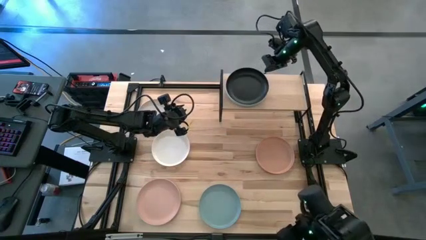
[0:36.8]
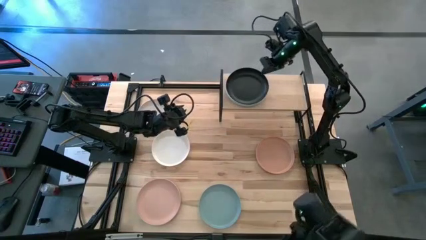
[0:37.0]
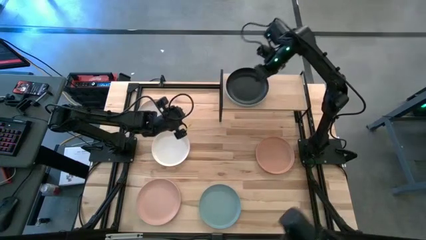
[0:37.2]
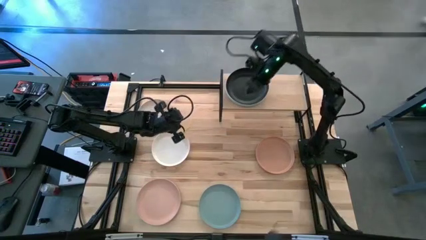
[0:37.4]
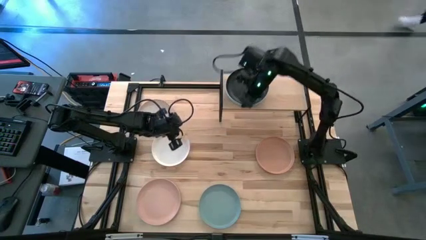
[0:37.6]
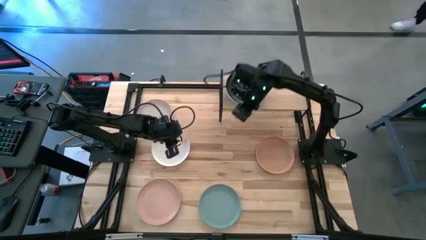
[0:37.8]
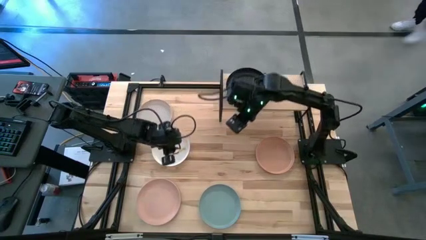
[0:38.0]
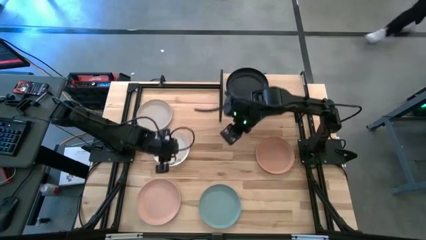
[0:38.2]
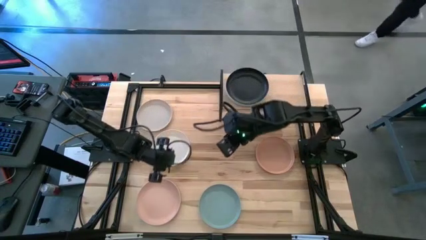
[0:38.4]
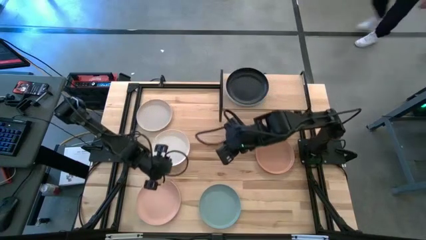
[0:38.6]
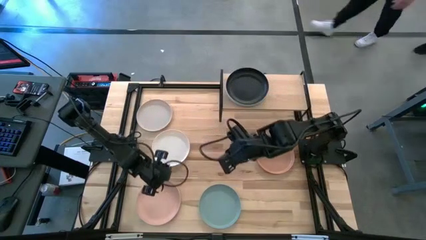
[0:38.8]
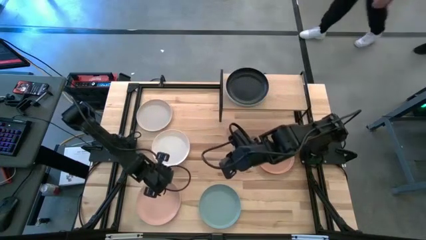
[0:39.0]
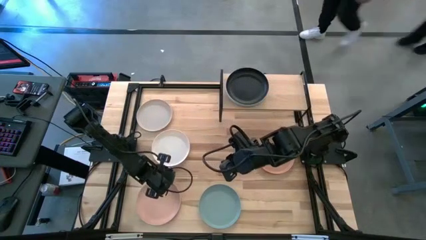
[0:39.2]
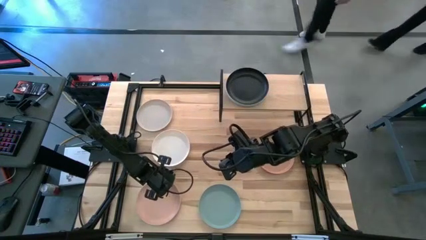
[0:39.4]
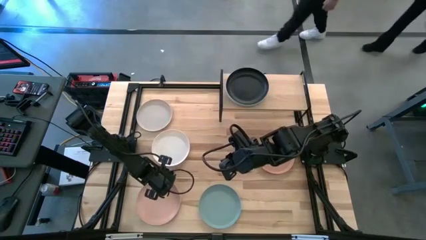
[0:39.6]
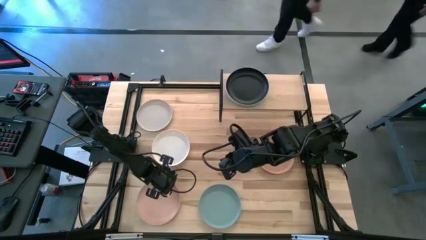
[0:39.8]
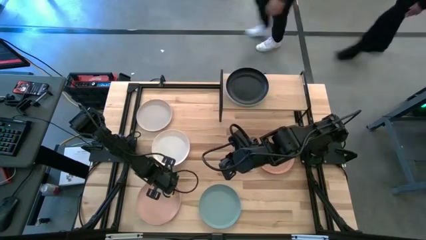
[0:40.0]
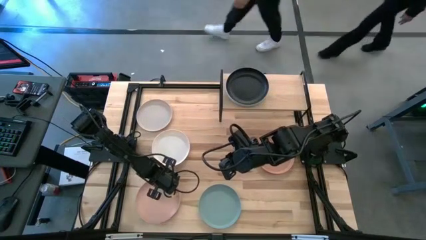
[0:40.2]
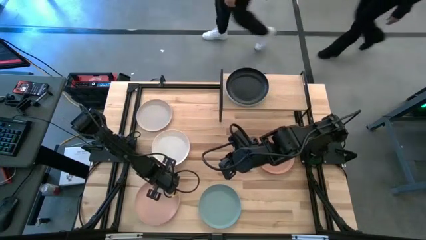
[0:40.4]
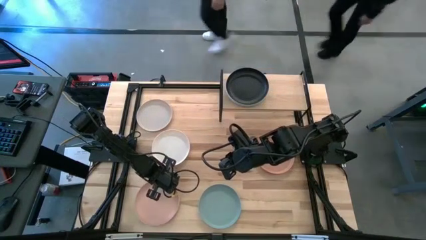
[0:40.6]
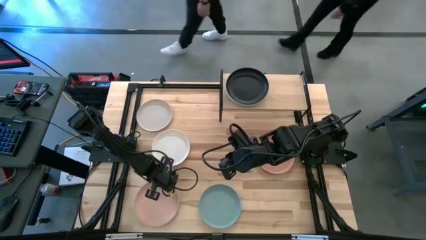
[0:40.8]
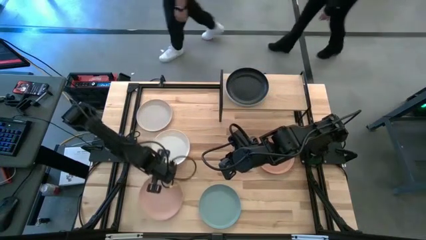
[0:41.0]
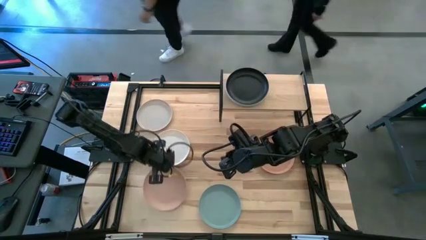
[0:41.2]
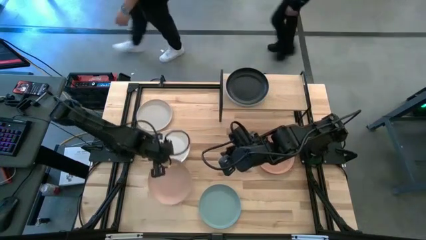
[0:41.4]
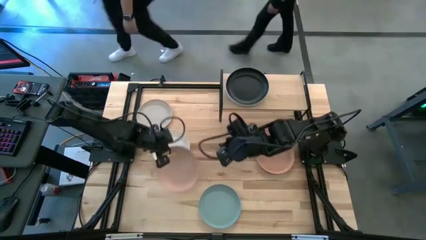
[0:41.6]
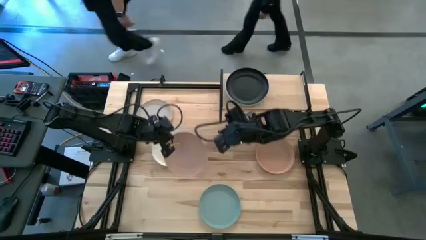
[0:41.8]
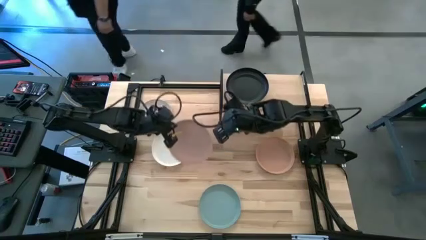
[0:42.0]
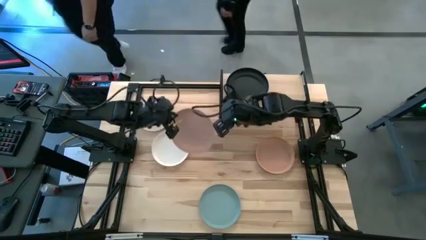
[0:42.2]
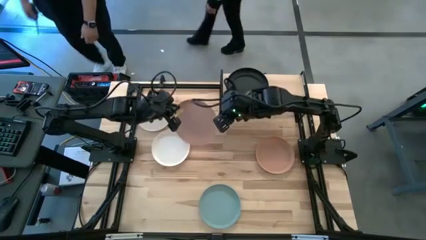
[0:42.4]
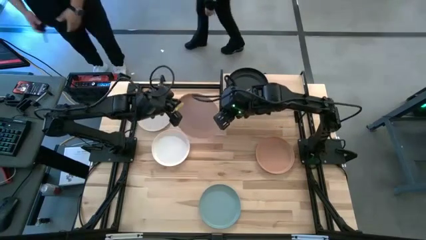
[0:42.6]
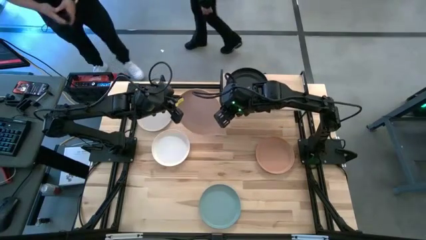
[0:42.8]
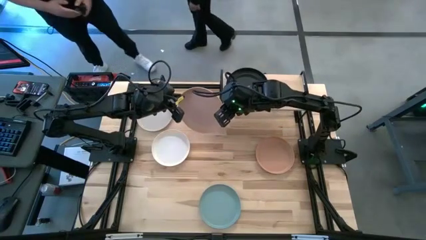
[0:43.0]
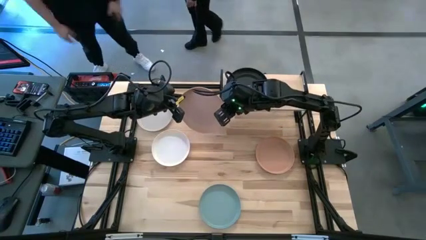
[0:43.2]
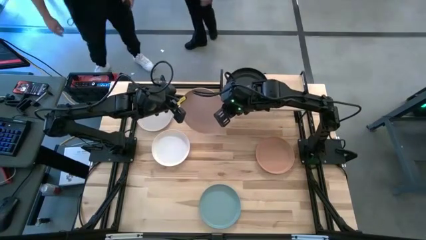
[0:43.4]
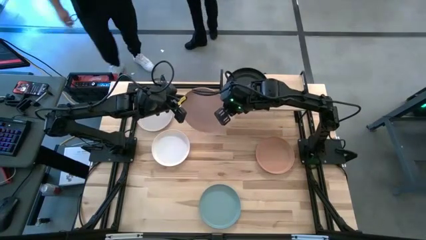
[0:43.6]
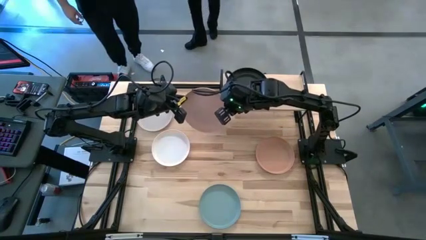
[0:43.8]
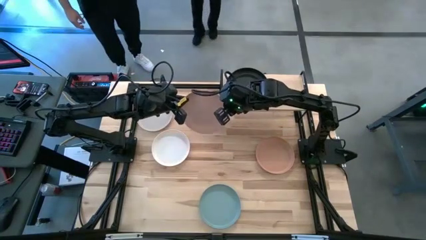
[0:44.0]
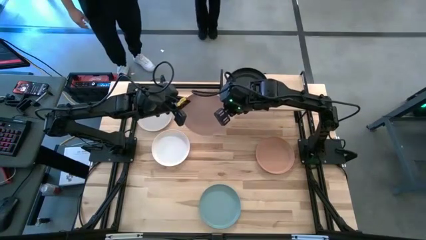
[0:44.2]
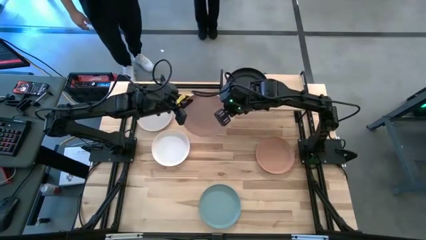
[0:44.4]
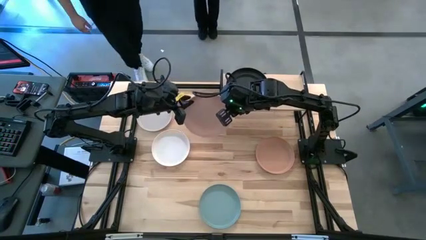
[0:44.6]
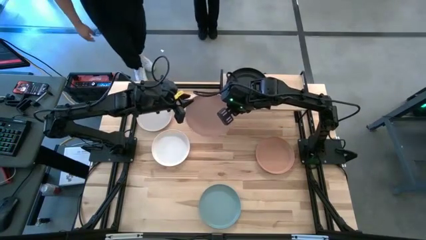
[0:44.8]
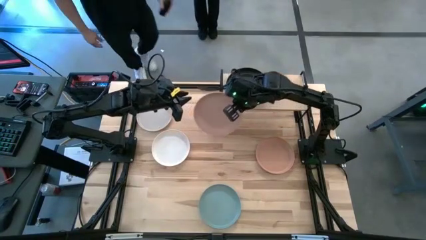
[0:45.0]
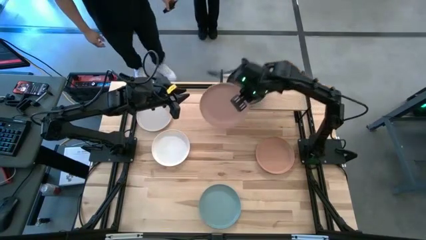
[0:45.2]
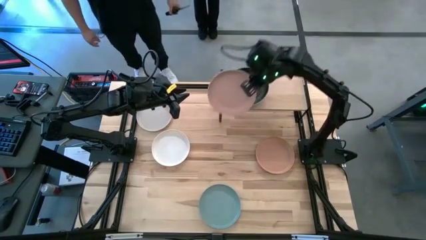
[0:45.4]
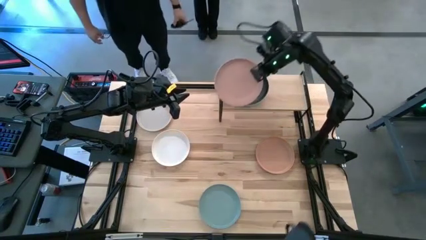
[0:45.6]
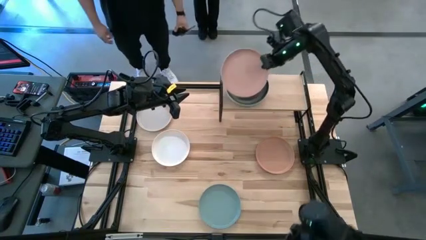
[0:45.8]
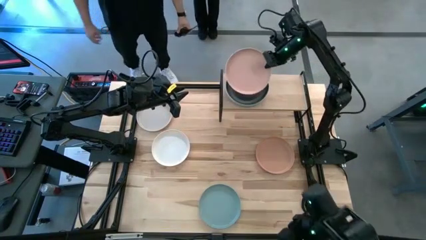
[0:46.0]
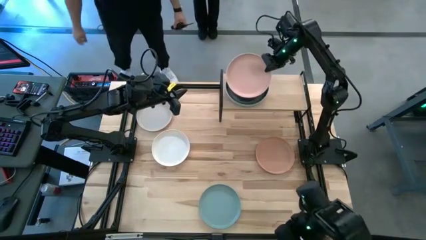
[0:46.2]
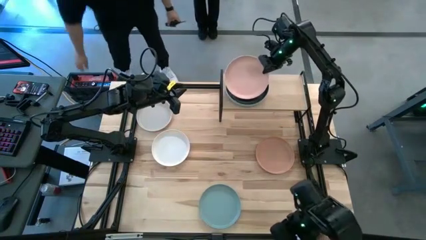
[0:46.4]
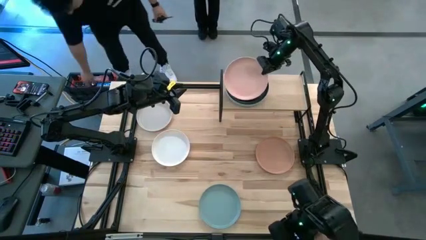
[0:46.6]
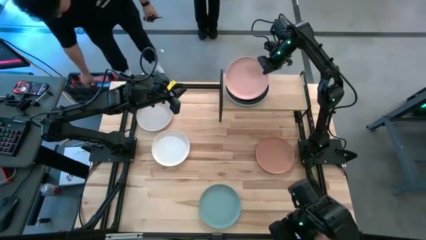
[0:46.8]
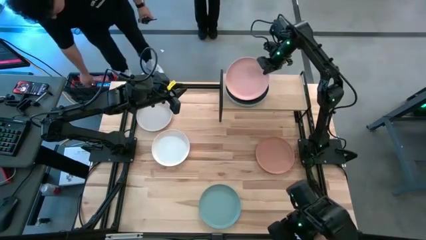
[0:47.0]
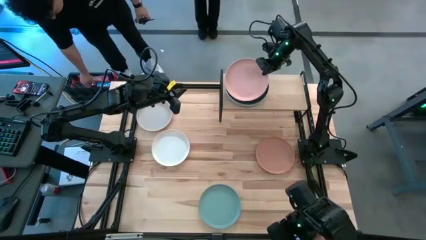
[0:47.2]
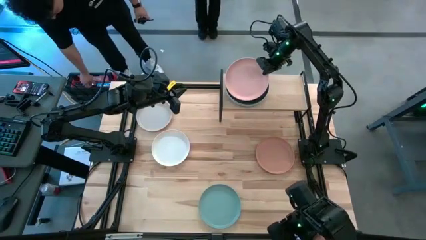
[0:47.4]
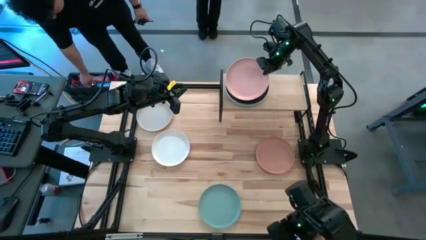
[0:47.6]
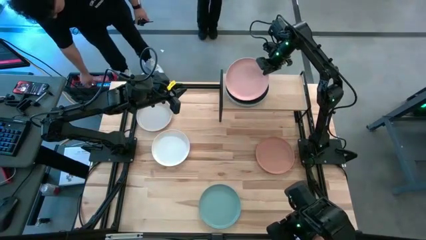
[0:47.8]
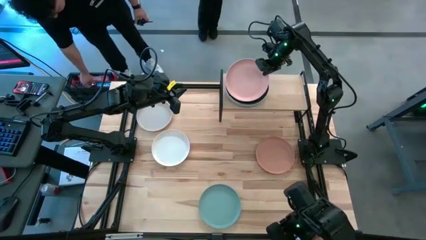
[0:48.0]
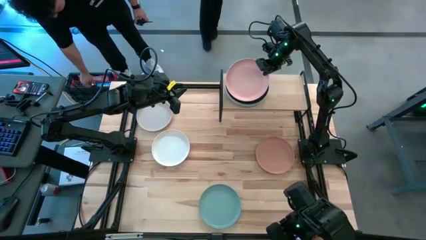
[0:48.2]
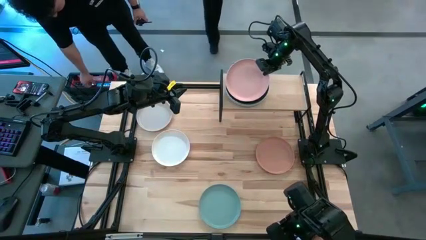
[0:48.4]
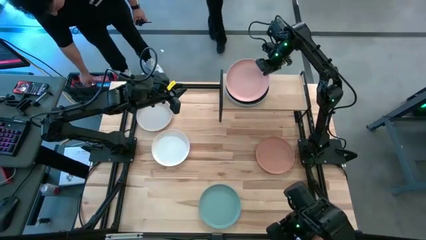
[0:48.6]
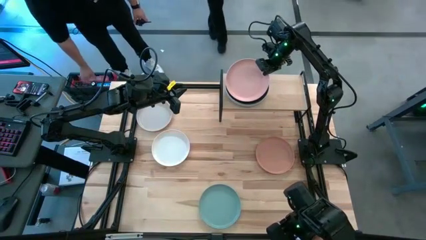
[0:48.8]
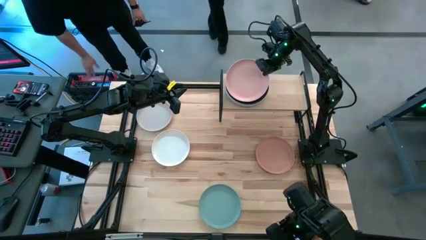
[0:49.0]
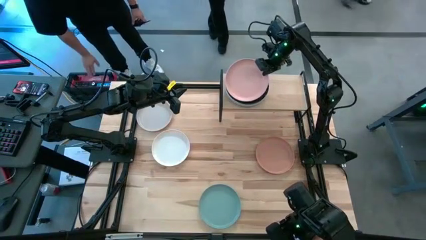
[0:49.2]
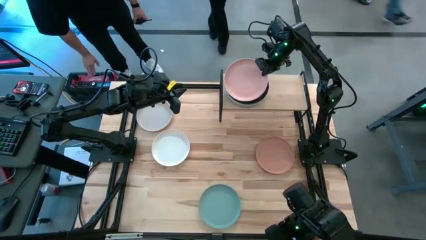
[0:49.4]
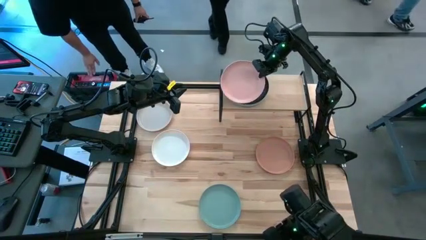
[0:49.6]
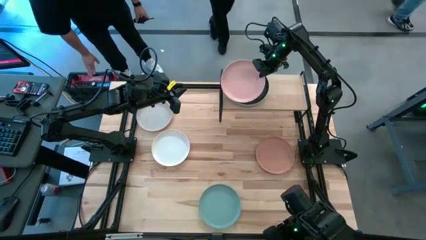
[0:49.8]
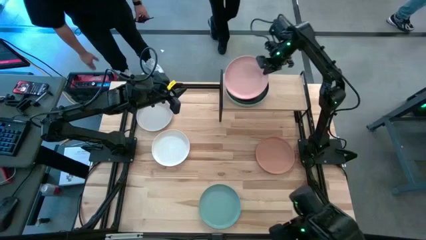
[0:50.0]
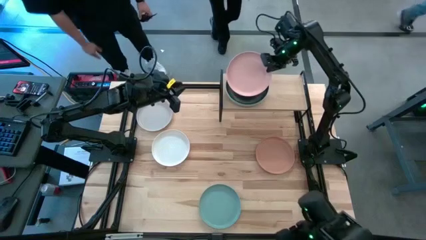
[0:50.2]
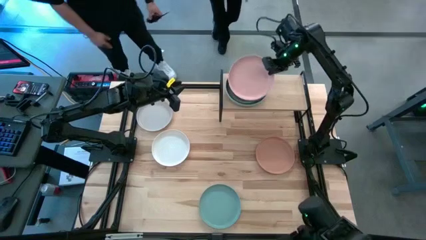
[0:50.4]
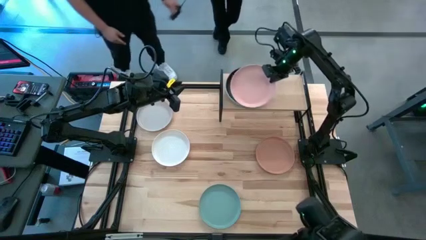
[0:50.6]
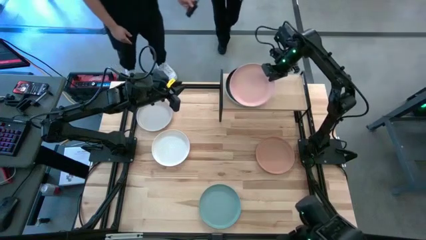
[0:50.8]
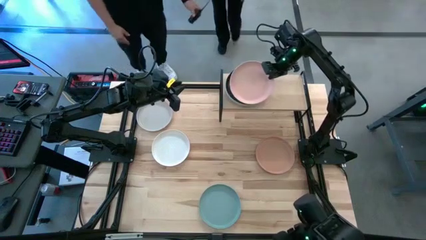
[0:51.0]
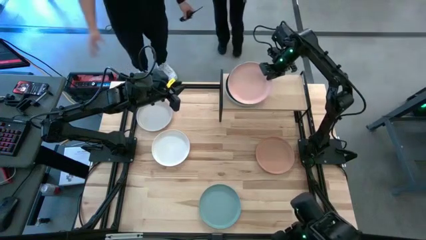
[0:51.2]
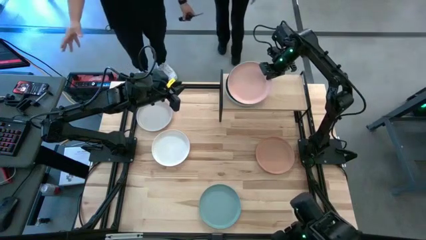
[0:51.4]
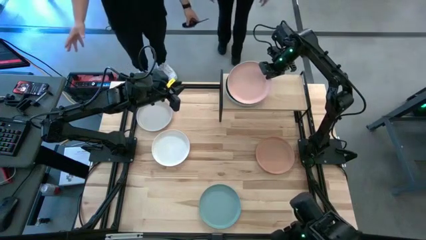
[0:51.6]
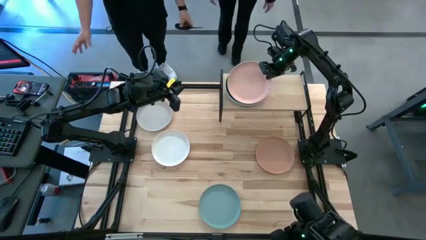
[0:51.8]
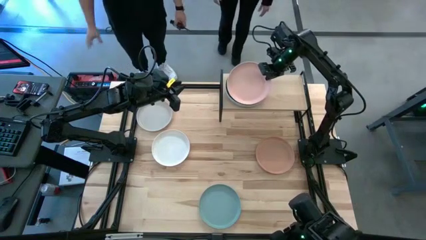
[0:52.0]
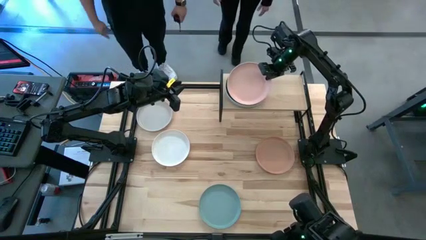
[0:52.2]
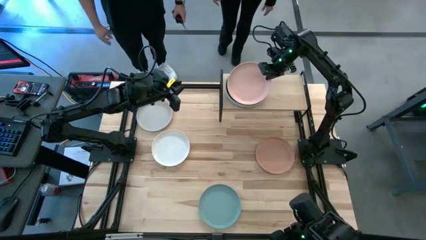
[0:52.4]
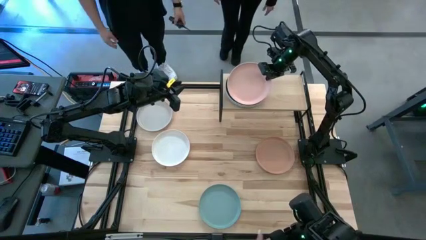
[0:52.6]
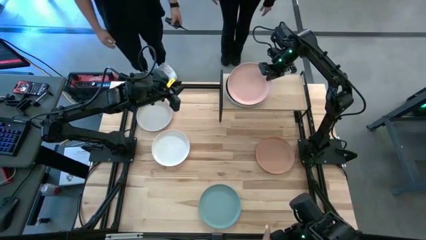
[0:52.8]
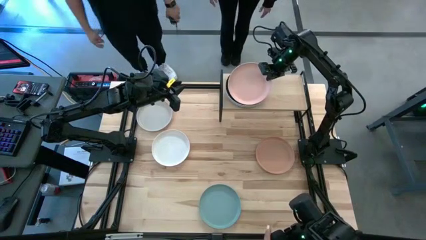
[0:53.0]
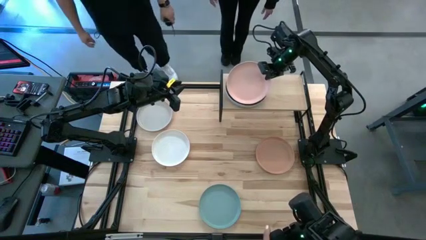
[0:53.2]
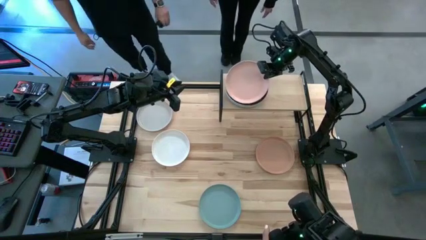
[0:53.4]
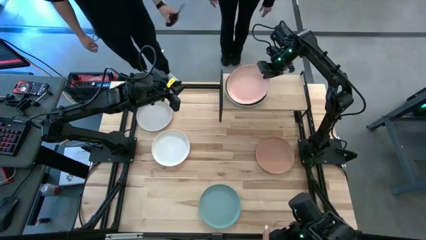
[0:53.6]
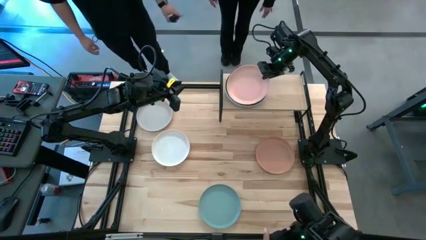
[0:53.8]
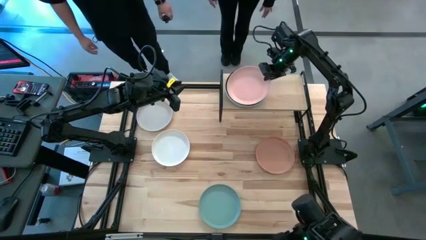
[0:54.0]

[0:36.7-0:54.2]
Task: Place and stack plates onto a shelf
Stack the pink plate on top of the black plate on the shelf
